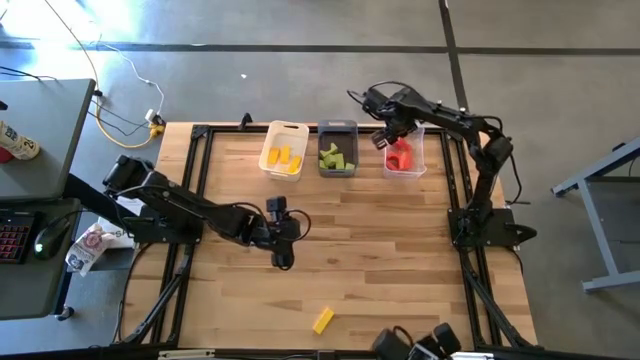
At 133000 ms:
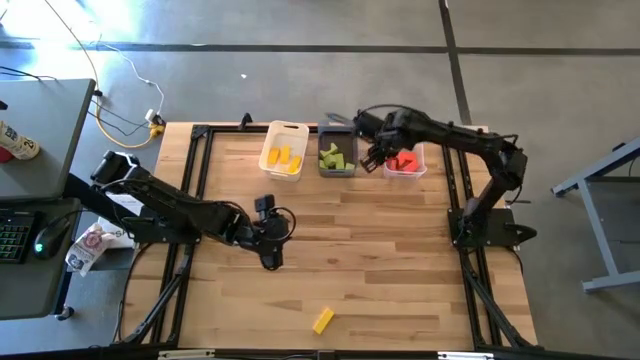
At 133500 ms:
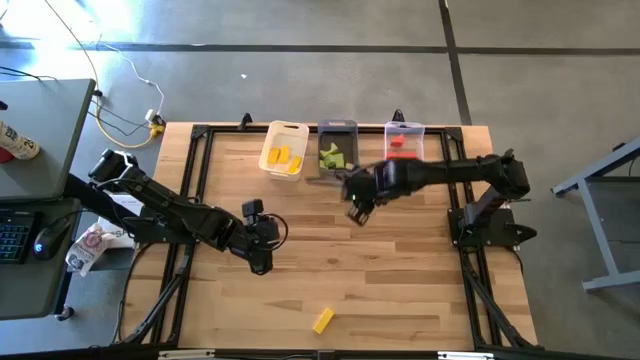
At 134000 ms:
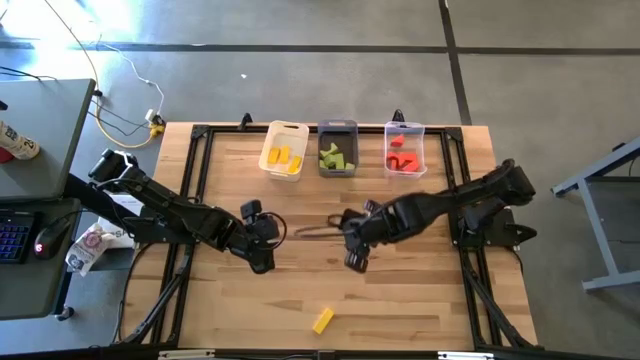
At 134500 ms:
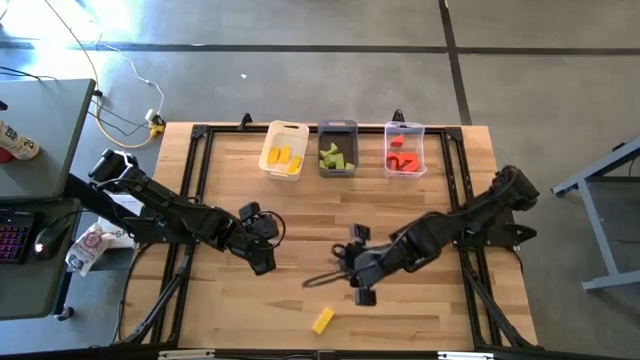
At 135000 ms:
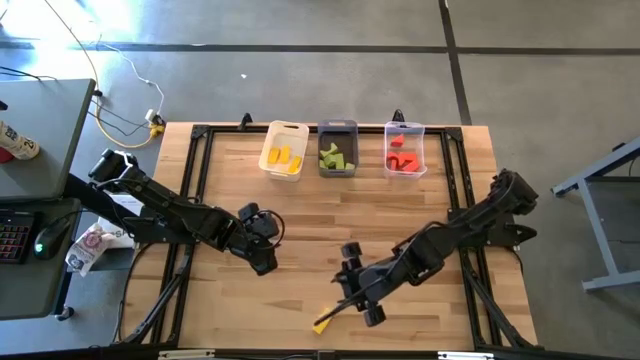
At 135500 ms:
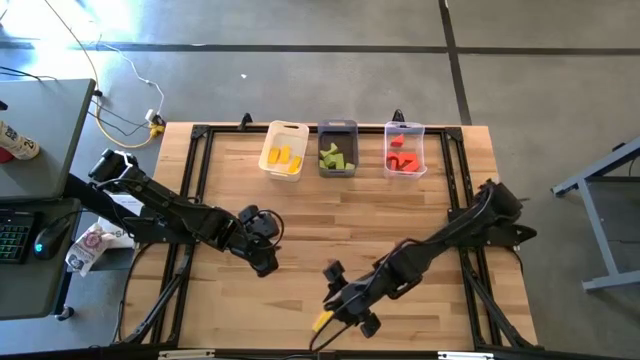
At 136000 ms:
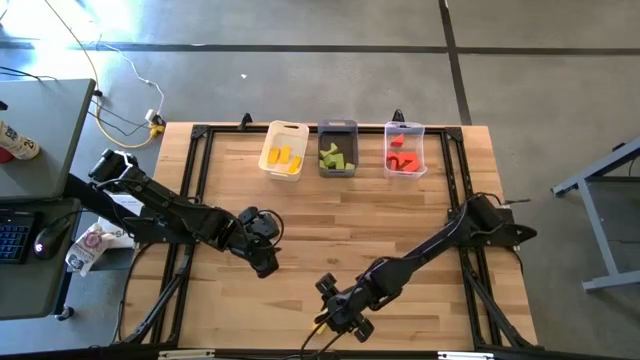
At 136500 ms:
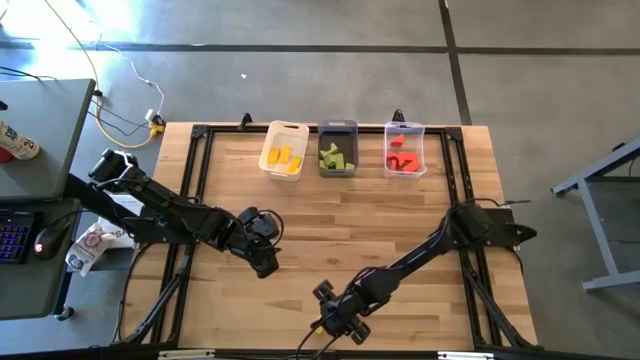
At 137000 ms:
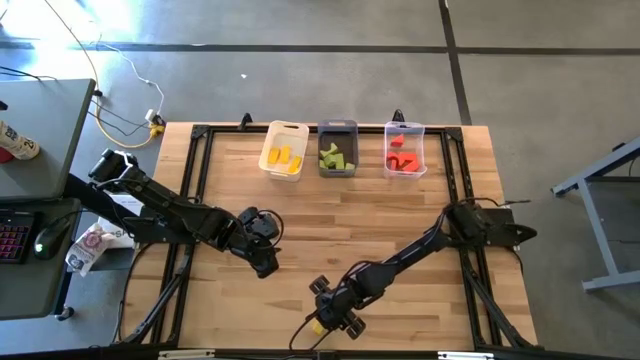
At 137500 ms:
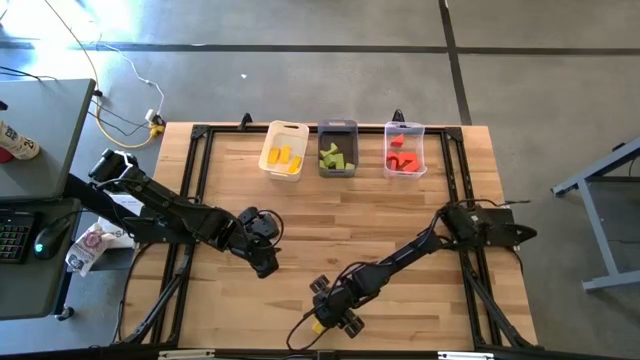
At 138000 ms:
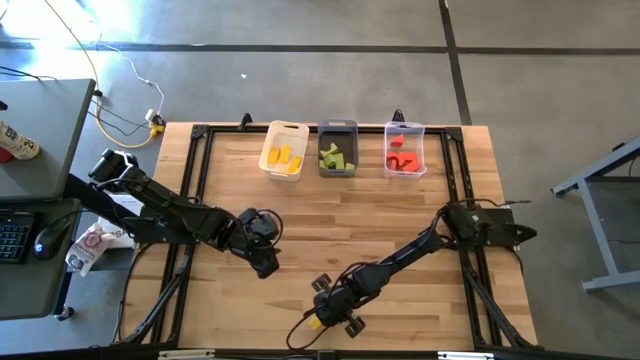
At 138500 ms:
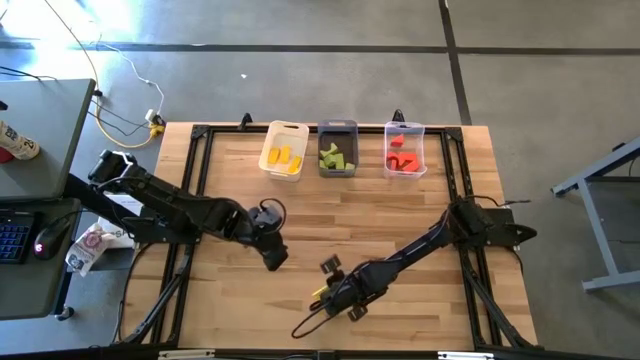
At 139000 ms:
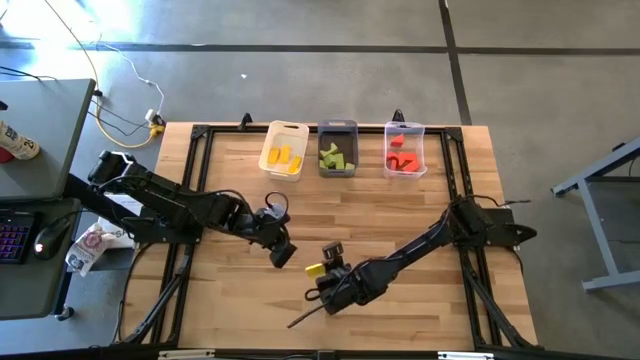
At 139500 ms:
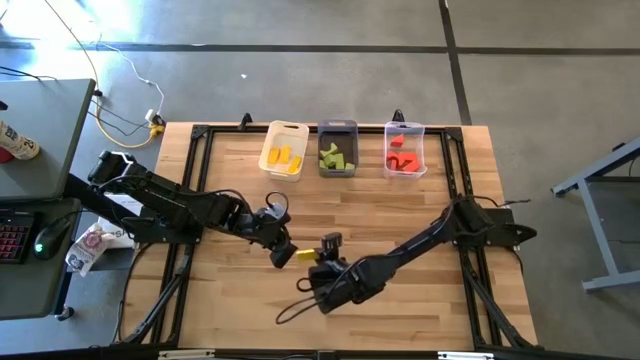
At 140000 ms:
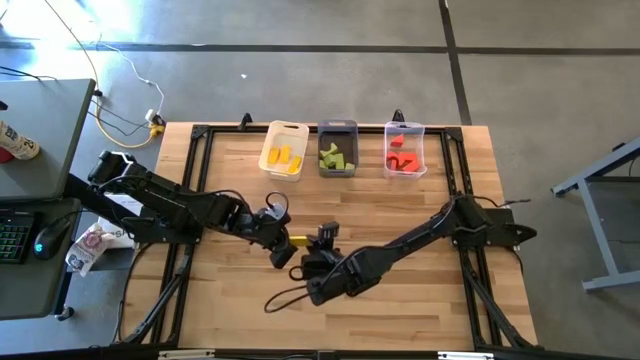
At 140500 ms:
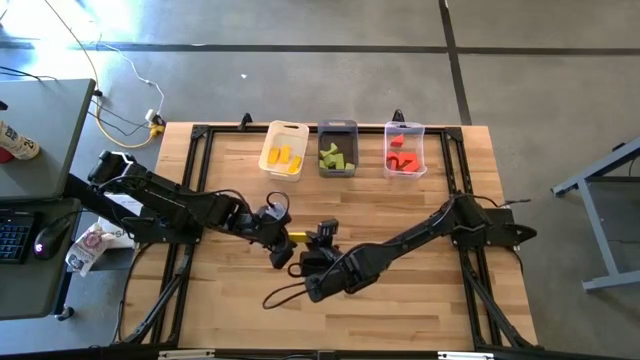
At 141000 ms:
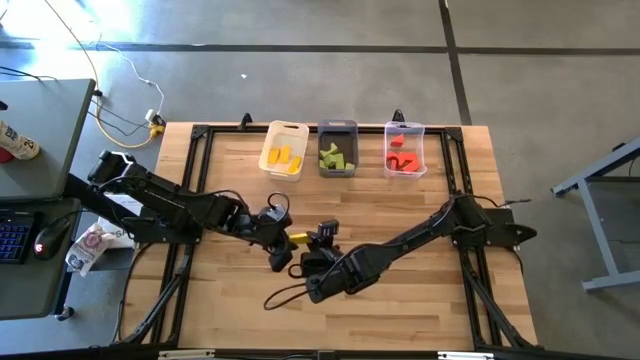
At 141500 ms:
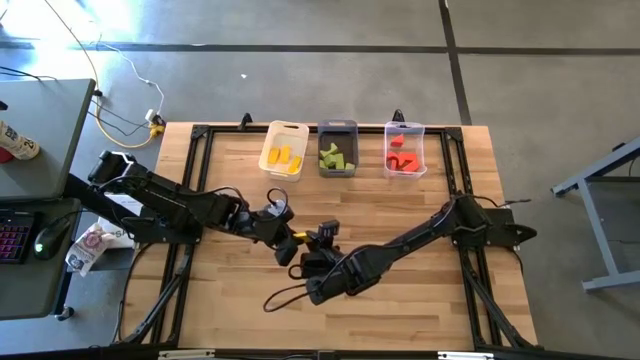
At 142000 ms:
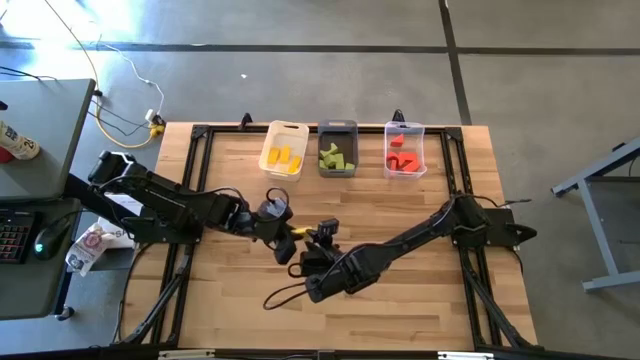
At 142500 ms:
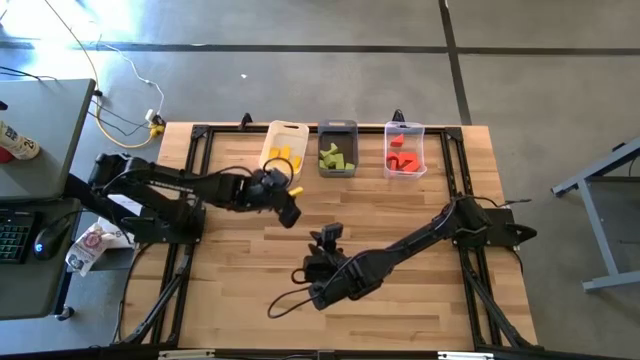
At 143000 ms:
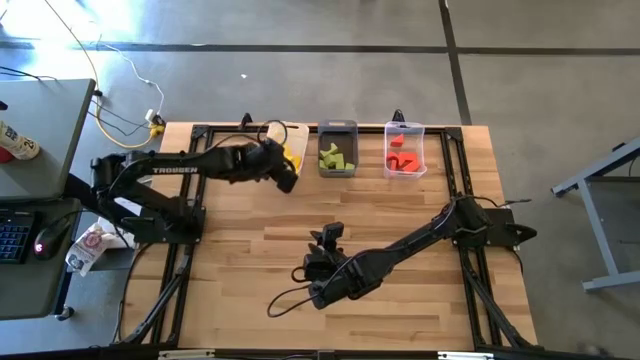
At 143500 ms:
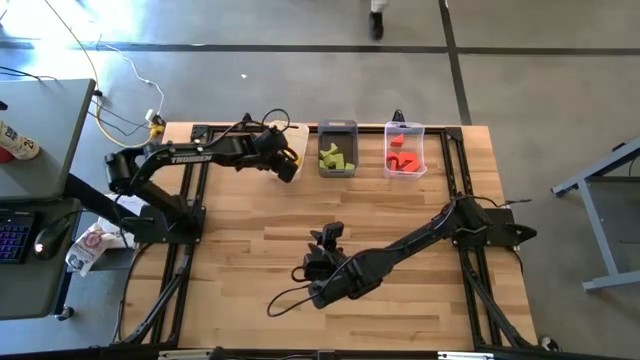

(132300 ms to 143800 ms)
Task: Sort & place blocks by color
Put the yellow block into the white bin

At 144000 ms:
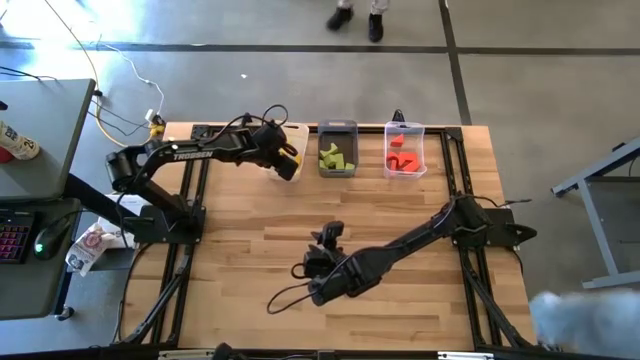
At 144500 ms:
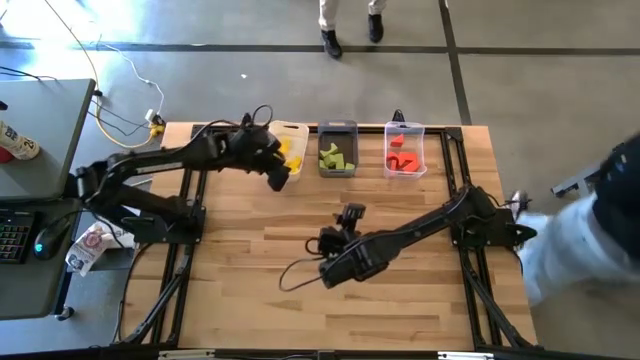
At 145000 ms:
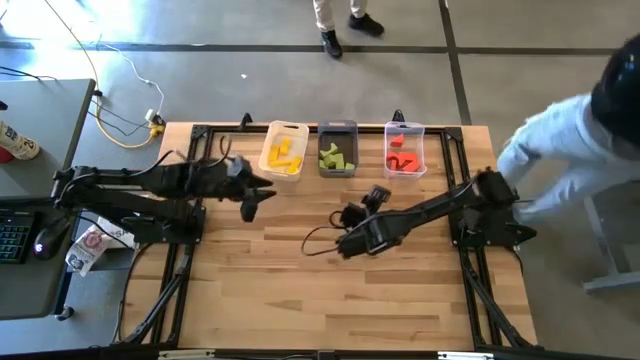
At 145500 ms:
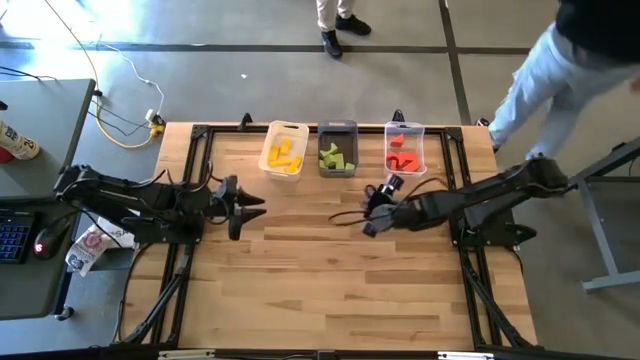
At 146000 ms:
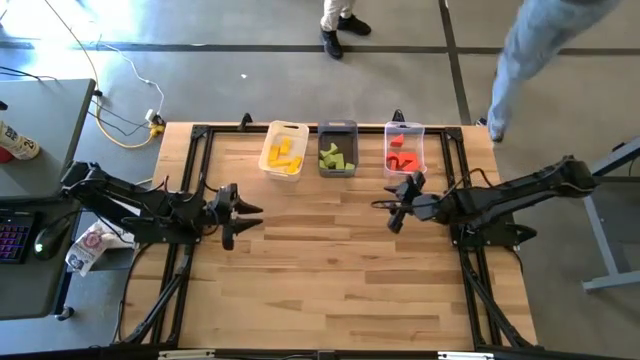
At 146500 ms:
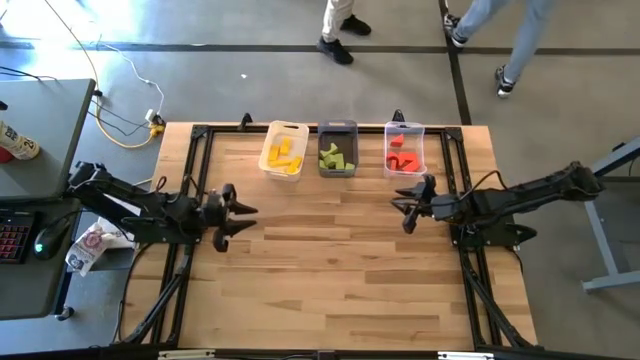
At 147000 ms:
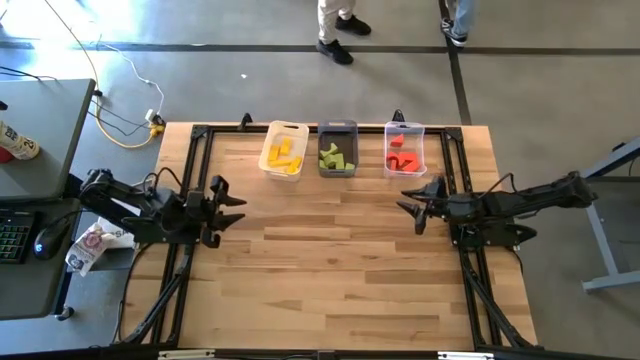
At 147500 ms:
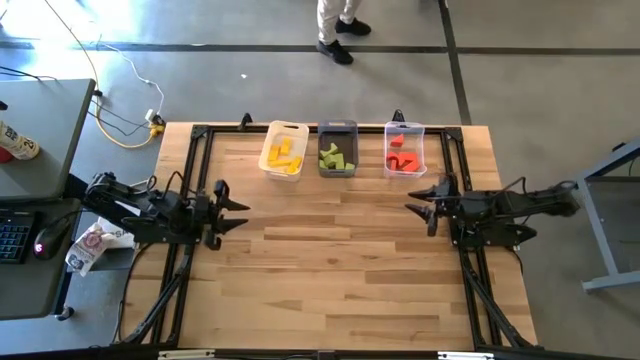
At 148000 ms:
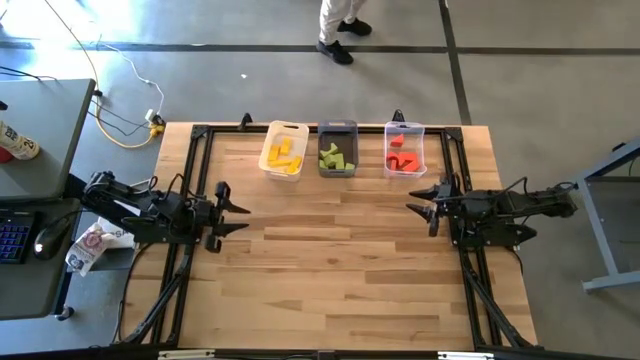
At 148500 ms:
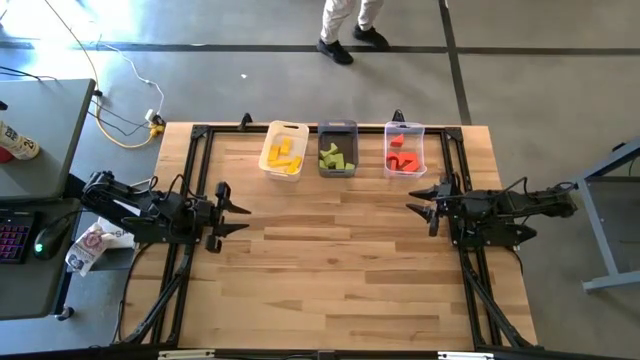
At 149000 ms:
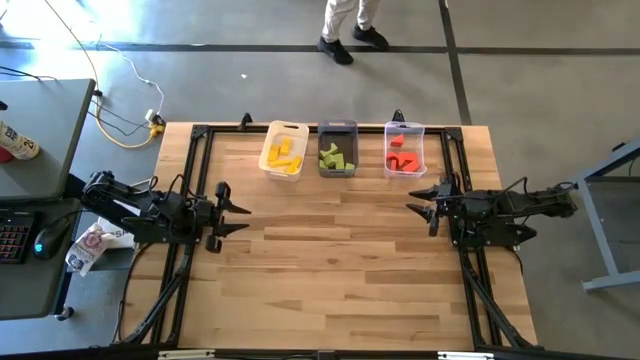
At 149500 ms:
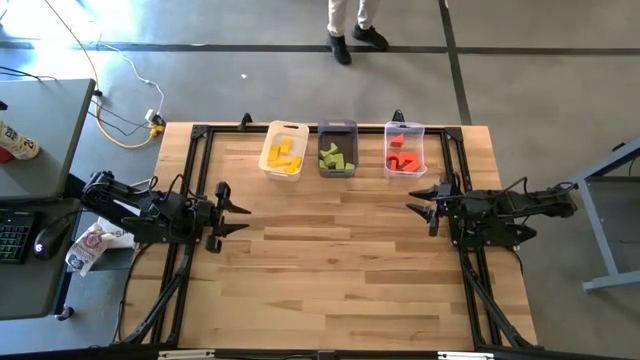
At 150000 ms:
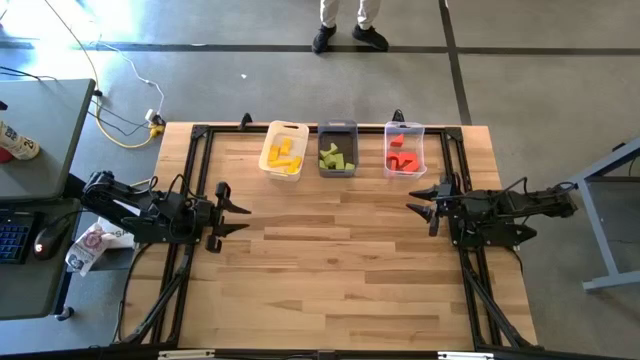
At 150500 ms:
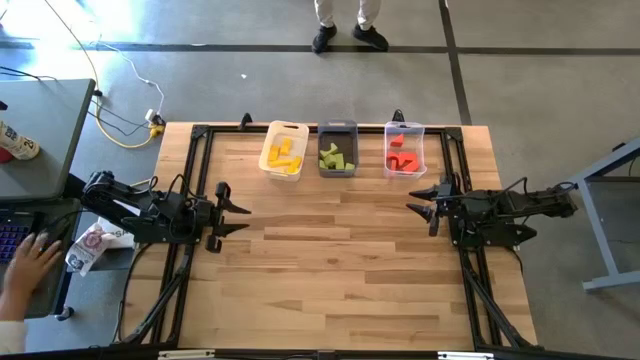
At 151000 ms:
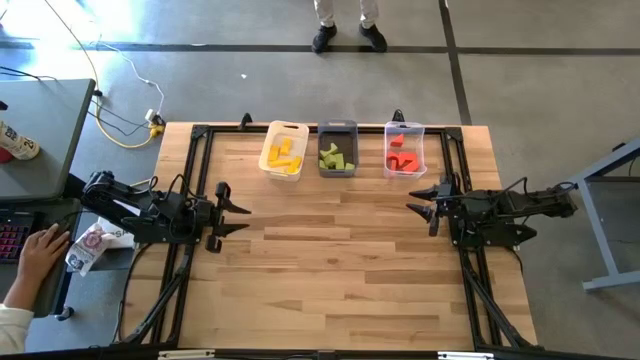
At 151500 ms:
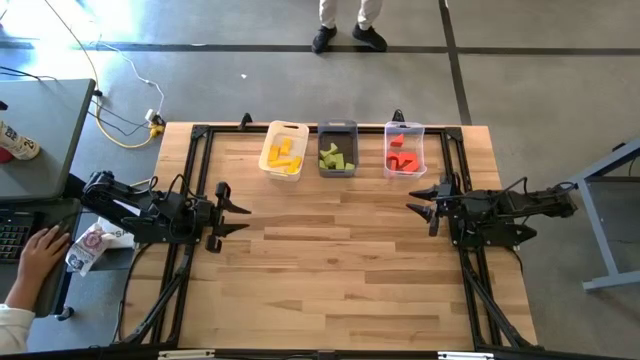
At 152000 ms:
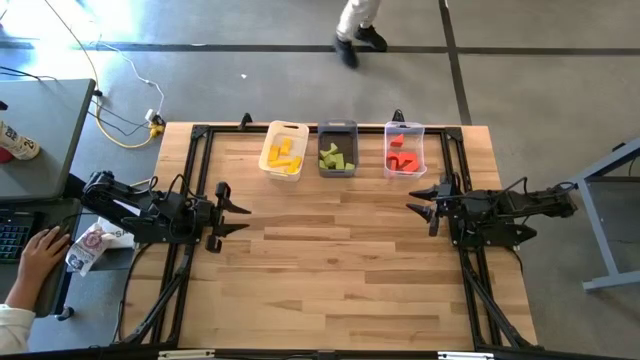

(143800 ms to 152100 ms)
Return to Home Position

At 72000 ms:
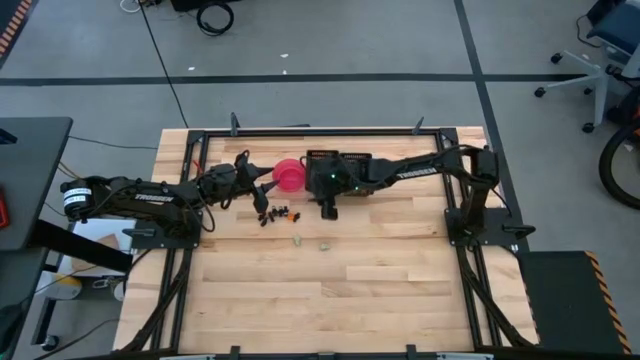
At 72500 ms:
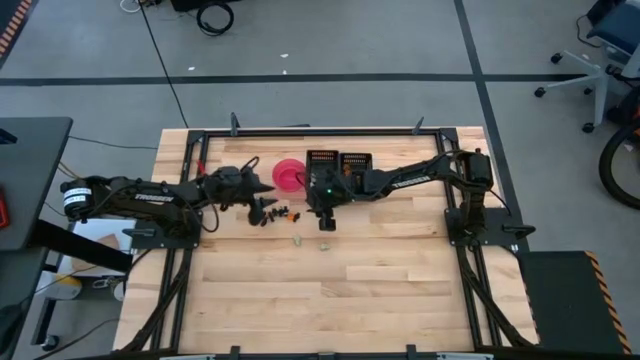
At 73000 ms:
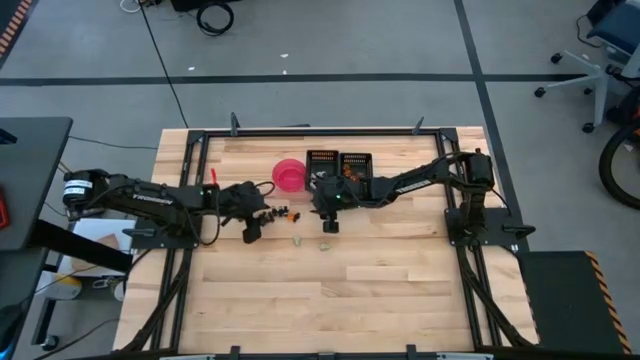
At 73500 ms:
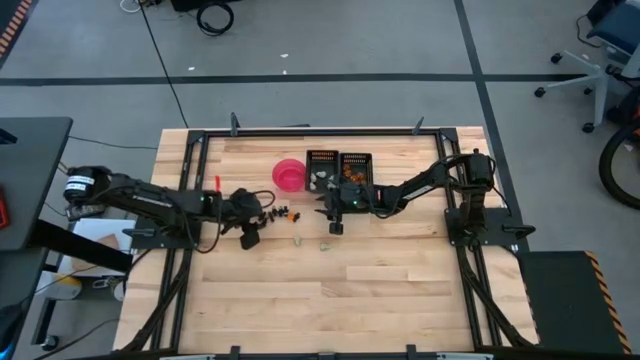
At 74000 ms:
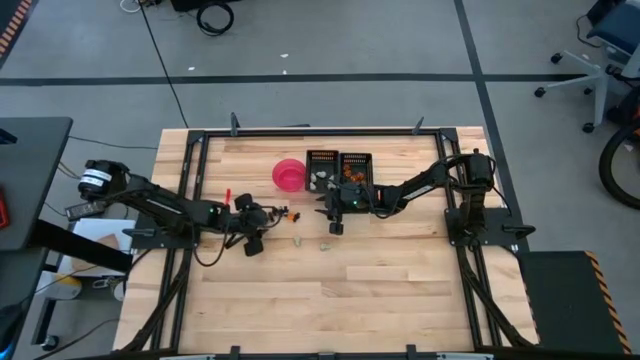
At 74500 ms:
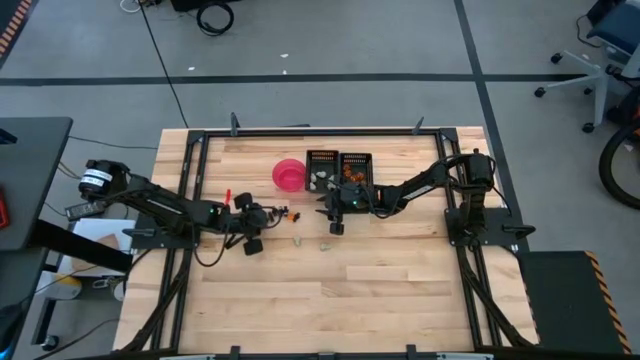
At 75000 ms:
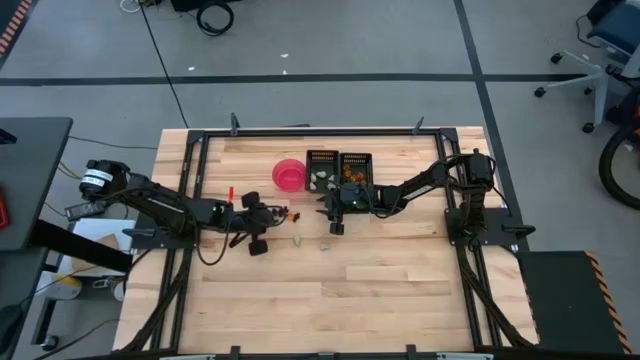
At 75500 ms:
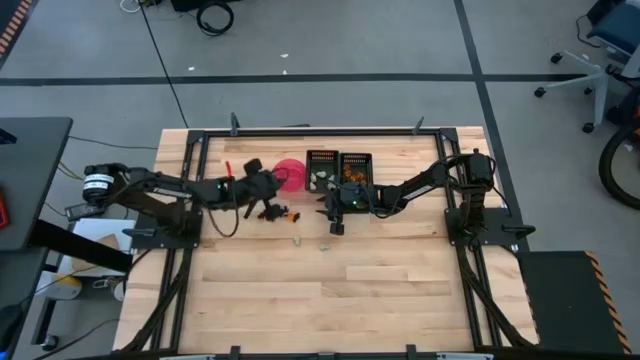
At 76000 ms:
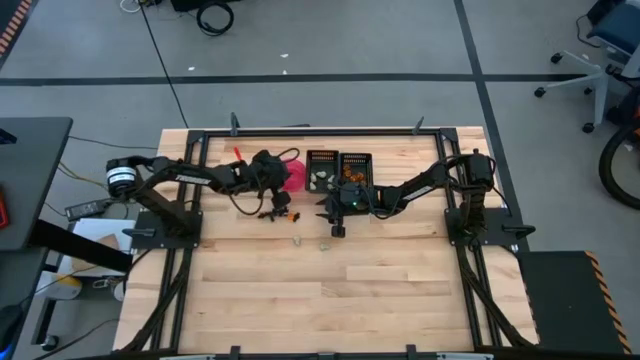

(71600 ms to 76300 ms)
Task: Sort Halloween decoration
Put the black skeleton toy into the red bowl
